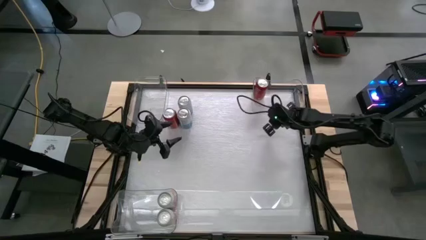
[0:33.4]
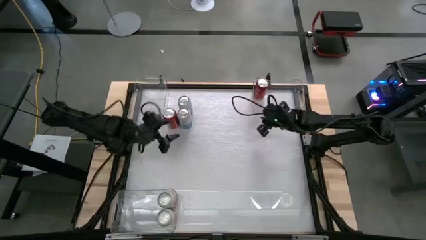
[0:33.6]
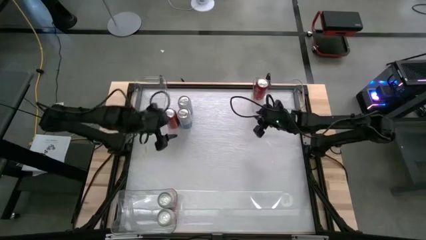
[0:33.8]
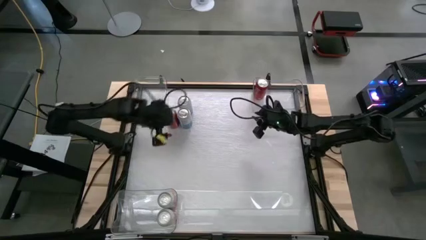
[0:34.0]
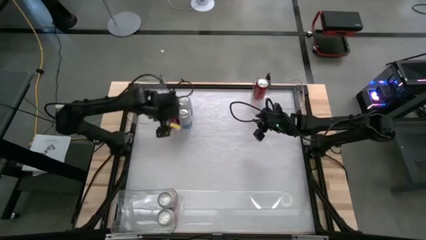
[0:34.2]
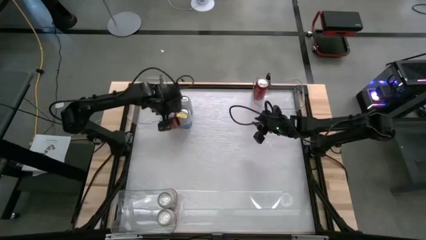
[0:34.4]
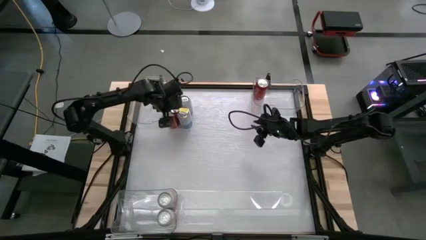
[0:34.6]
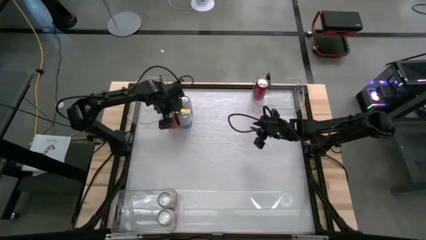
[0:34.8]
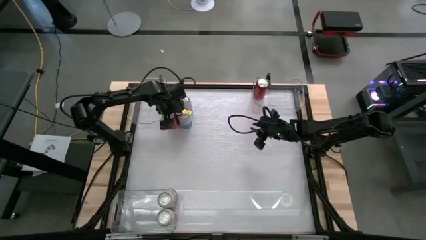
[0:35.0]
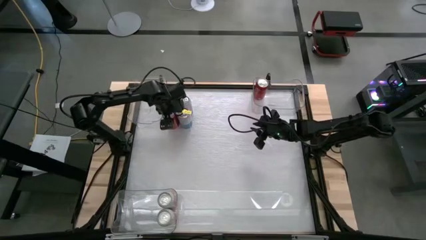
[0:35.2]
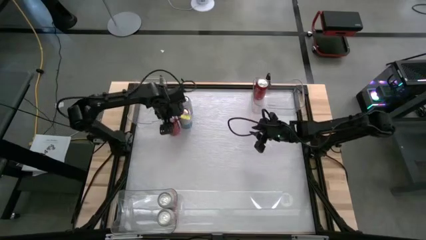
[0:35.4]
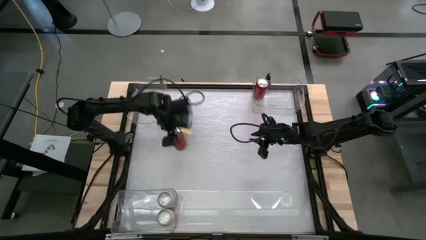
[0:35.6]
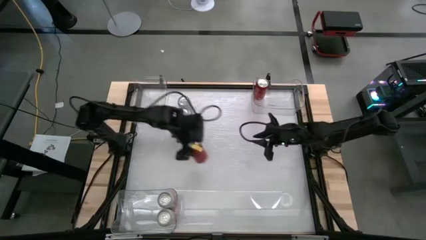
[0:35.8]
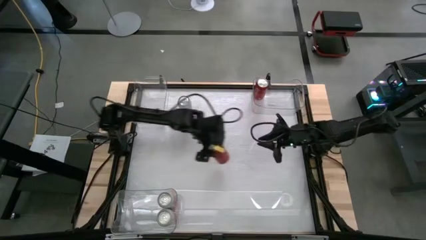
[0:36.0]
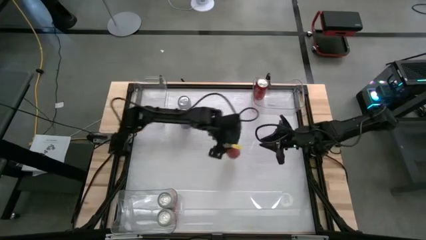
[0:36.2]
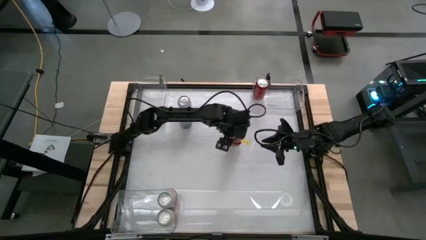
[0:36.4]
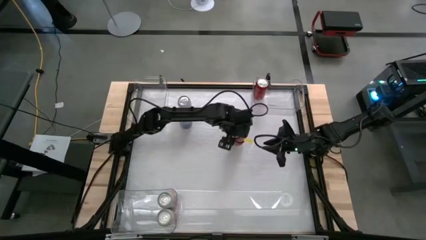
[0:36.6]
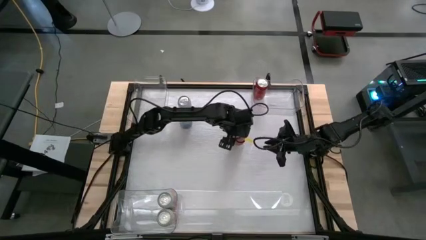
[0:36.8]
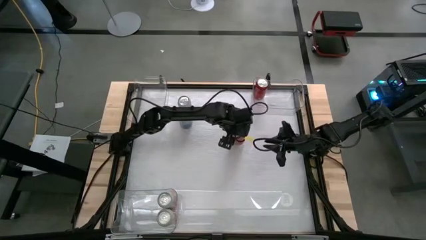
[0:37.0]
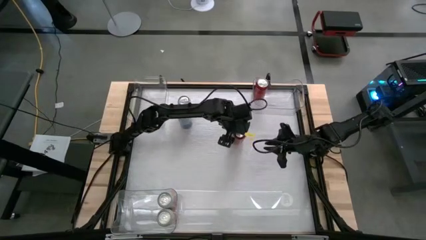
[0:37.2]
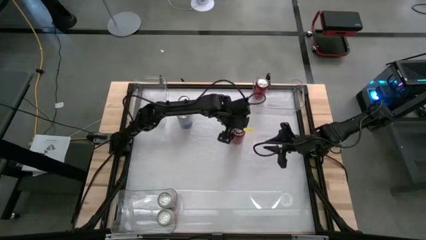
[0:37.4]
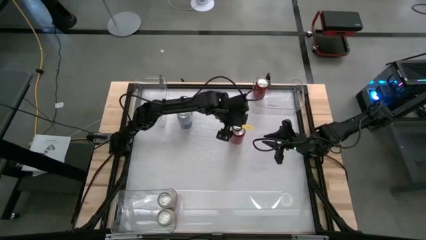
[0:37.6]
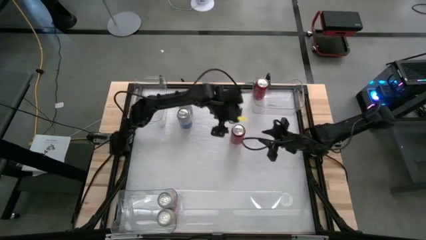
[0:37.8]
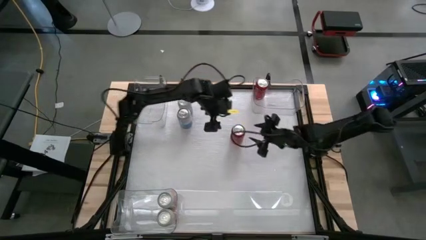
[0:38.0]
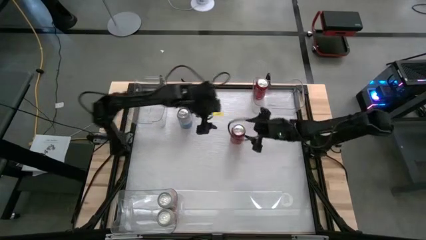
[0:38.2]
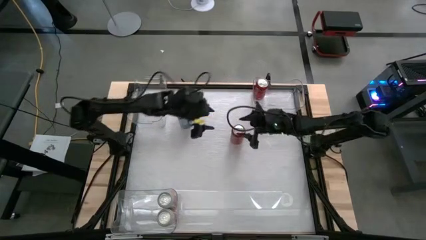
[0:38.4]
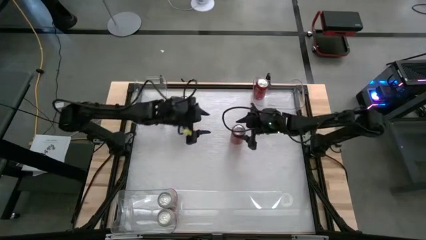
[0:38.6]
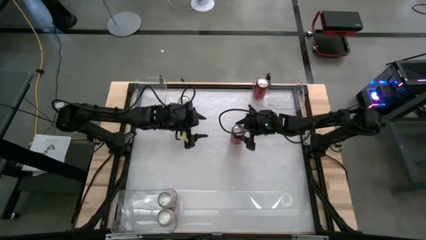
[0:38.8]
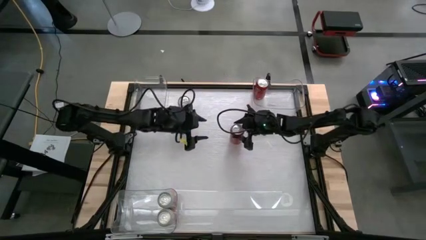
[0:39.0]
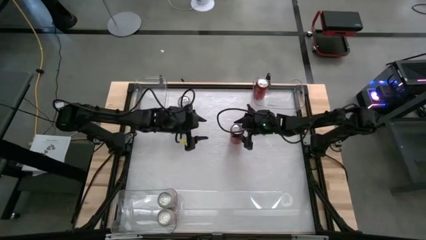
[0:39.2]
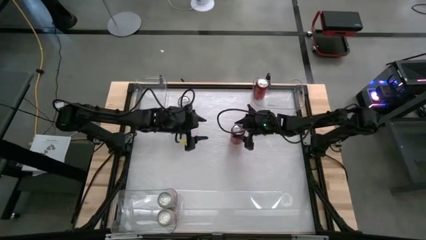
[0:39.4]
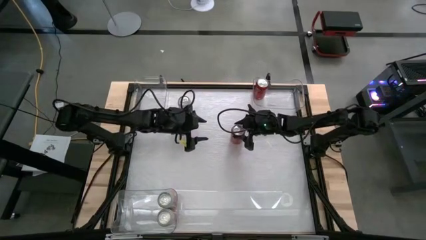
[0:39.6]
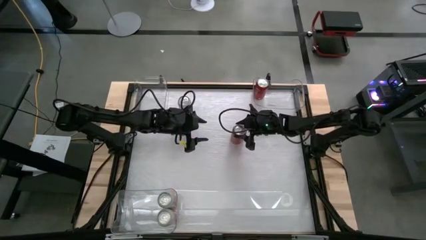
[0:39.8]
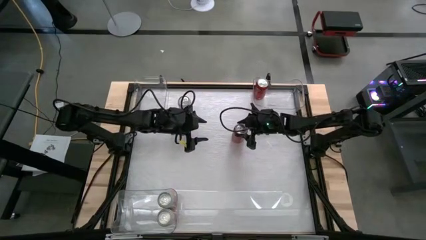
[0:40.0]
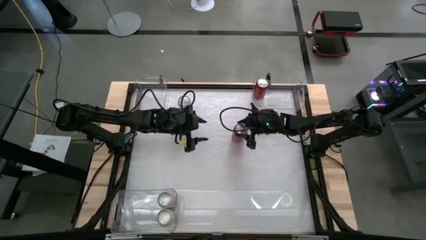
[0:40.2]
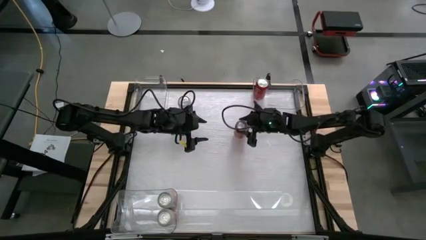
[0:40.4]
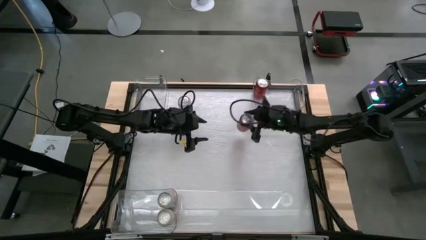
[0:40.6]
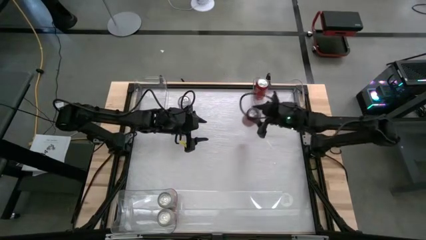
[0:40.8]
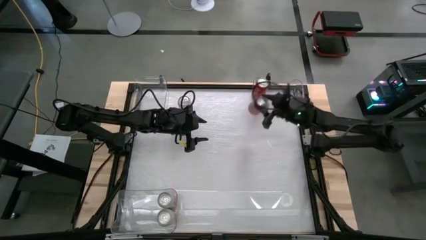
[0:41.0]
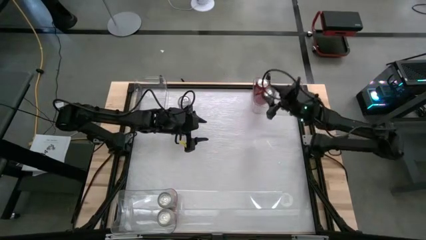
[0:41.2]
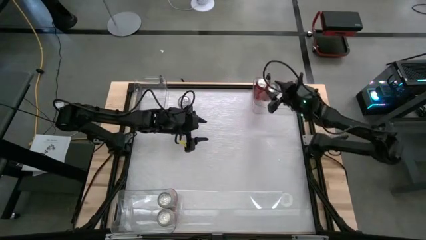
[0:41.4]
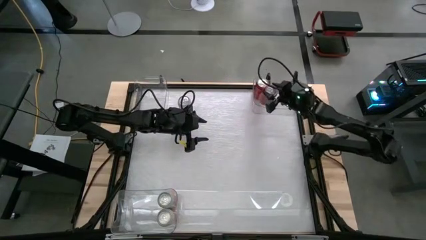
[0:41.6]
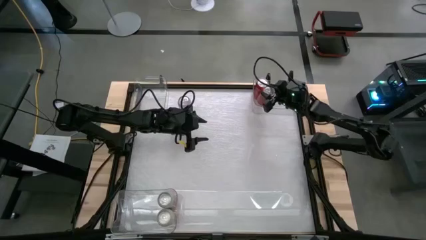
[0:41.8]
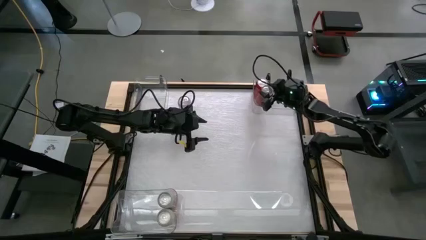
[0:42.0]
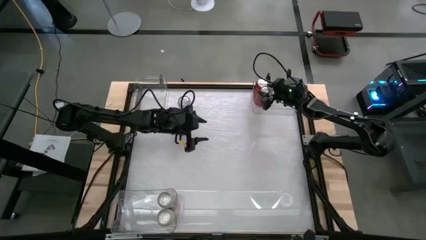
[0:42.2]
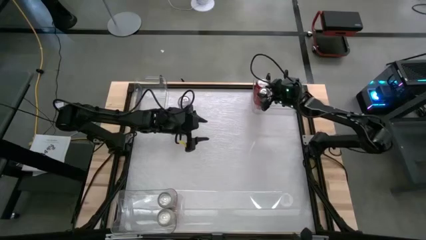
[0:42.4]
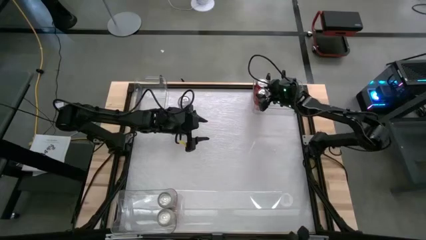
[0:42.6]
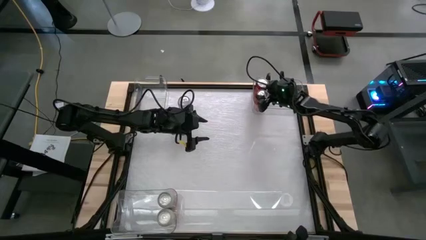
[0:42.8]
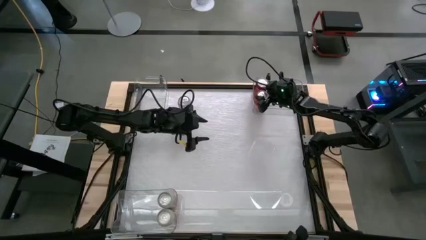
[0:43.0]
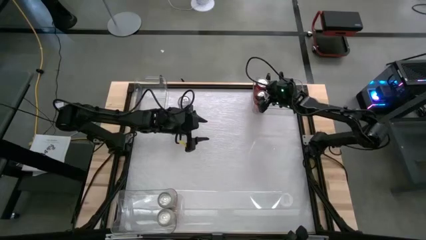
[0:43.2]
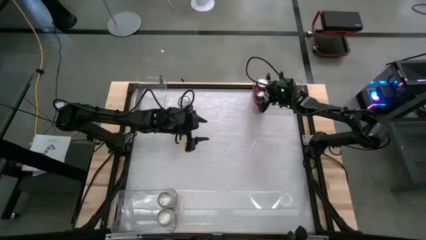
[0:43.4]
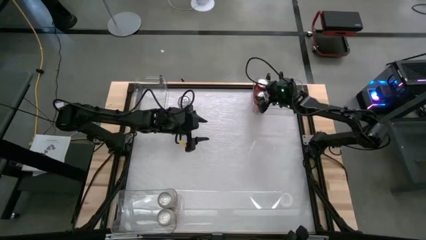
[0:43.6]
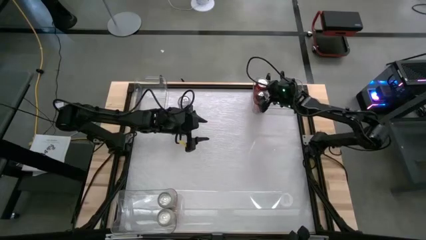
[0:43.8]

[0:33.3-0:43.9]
Task: Sort soda cans
Put the left red/black soda can into the right transparent bin

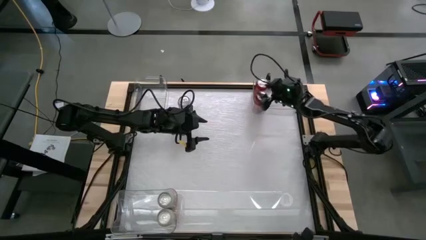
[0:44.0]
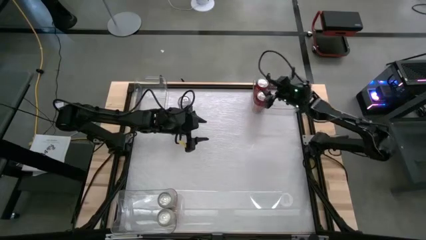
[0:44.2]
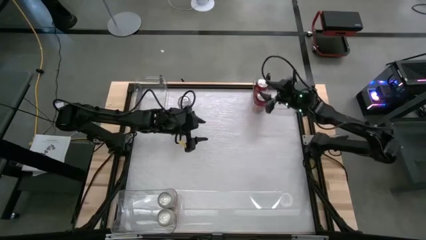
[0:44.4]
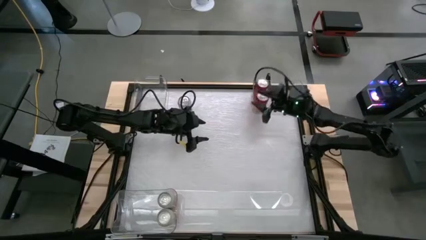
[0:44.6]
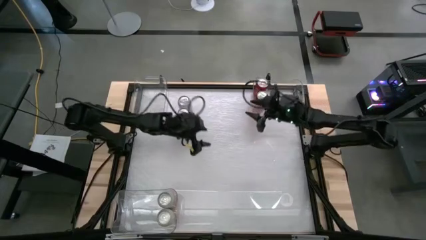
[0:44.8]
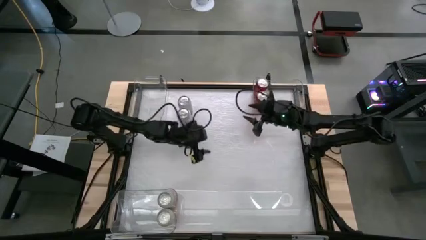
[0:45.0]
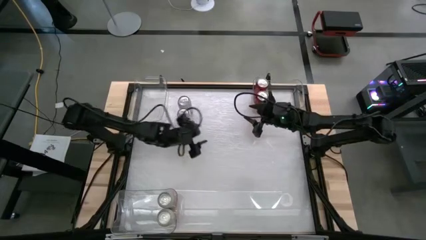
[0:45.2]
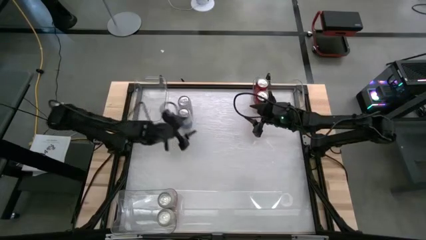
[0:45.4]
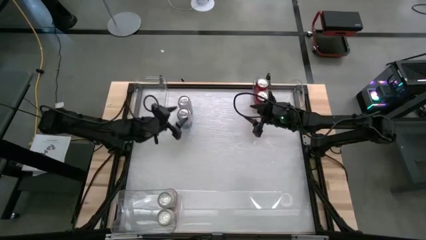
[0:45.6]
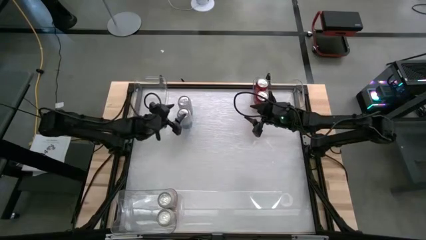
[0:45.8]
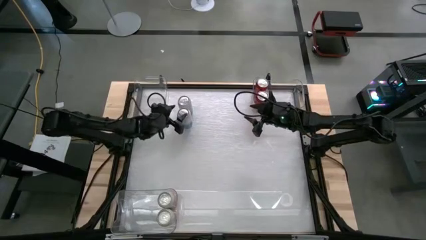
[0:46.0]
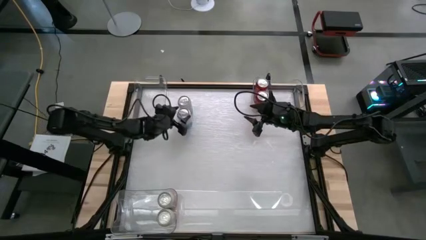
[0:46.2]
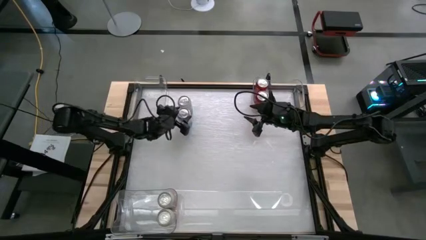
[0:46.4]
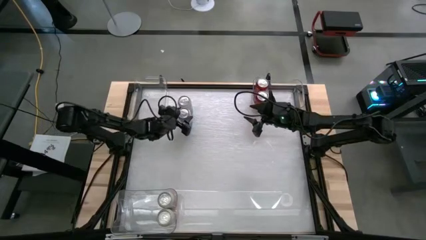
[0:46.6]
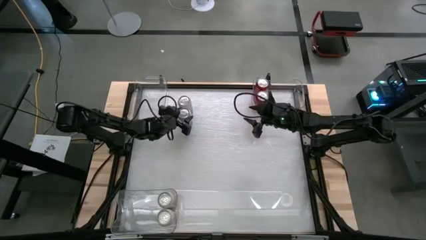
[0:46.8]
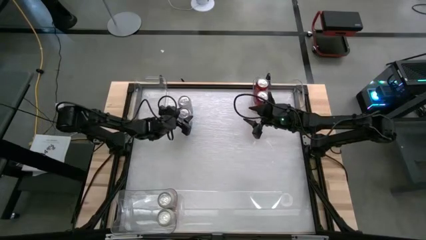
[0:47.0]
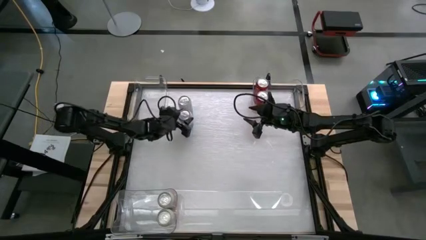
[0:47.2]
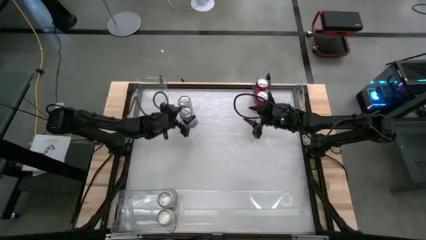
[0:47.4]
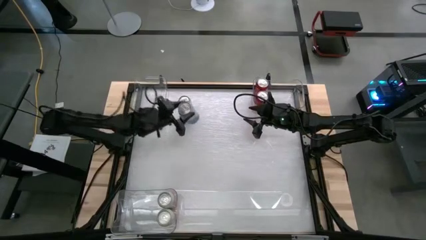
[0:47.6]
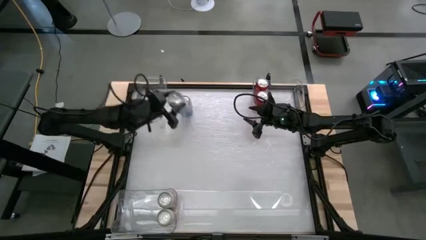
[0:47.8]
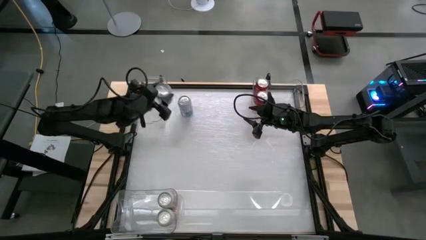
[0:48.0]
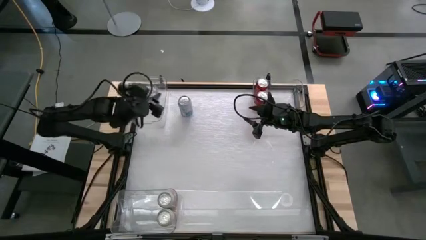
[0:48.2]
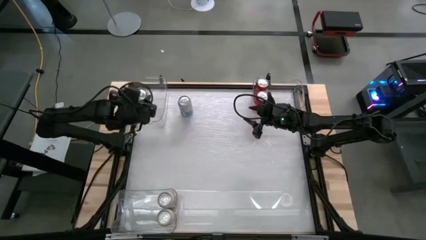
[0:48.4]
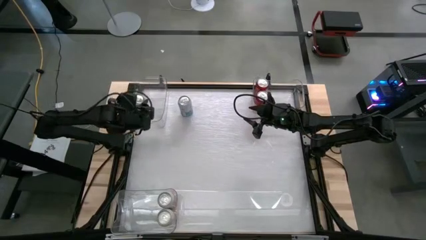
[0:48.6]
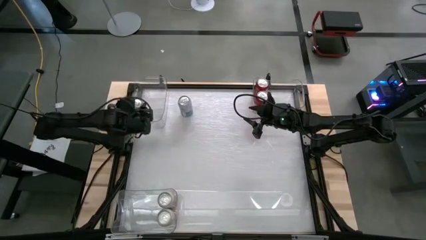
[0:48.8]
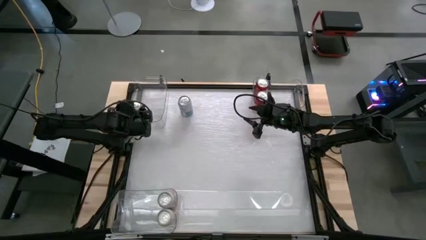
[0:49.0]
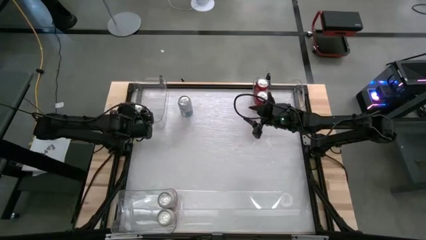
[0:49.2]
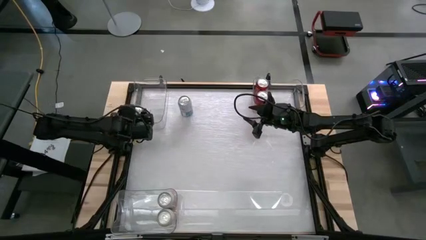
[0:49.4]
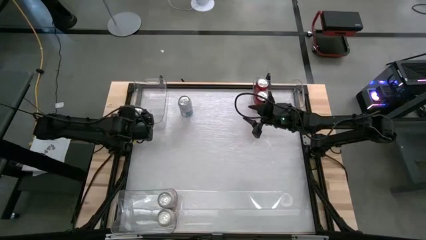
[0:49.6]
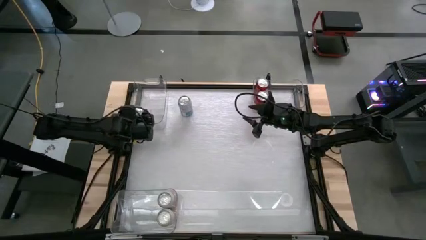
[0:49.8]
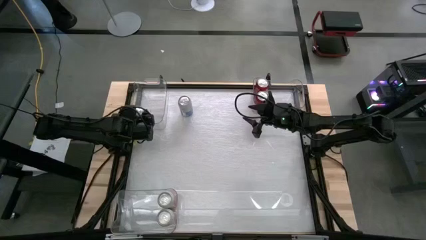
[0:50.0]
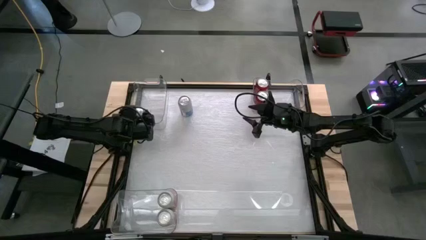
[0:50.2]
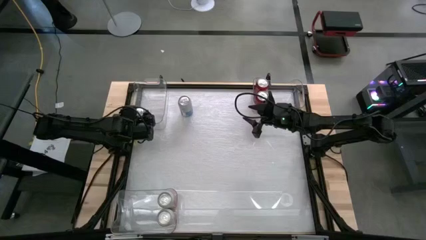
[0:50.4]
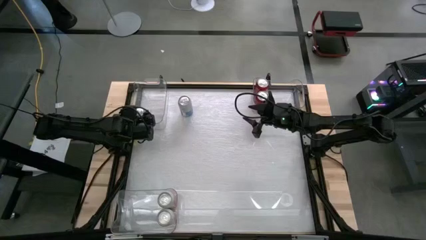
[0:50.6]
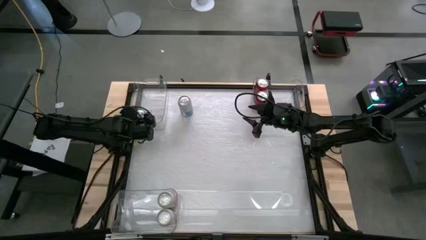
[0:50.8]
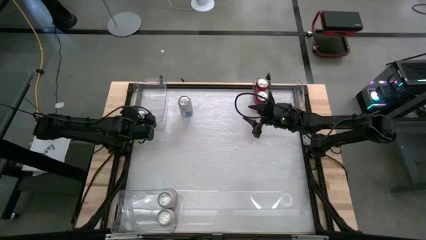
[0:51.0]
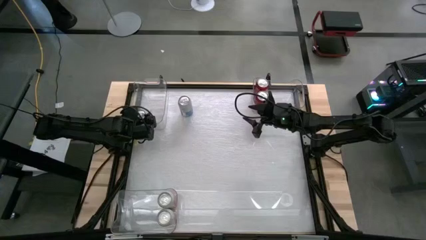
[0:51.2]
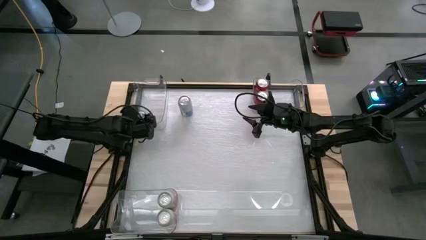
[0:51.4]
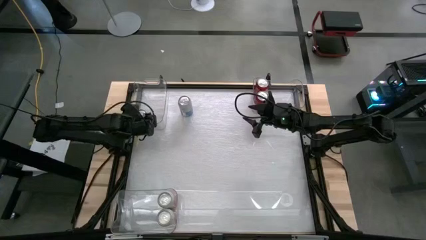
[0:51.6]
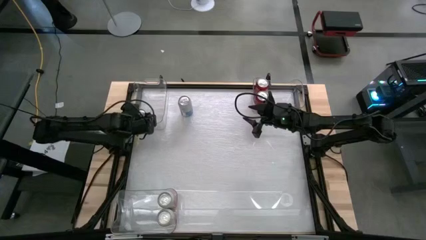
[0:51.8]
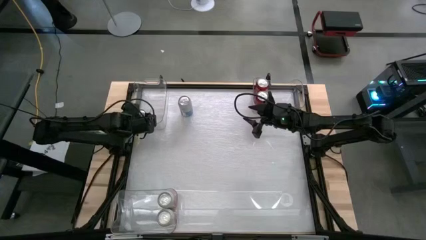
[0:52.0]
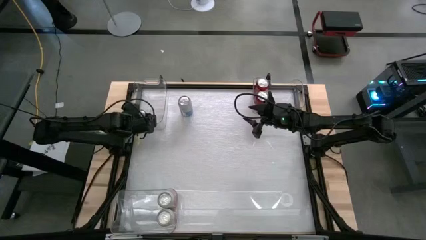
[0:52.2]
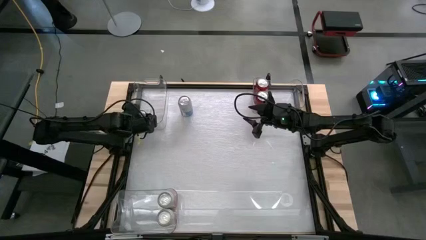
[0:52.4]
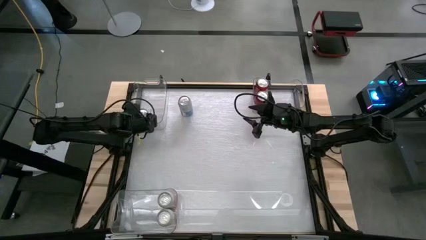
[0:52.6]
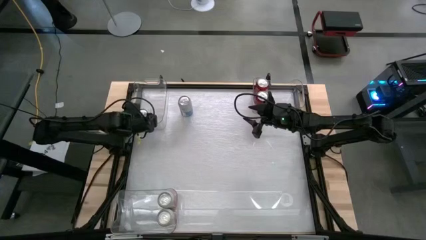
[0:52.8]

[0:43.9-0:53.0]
Put the bottom blue/white soda can into the left transparent bin
